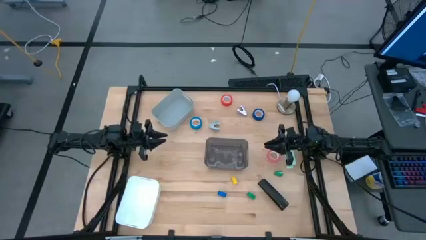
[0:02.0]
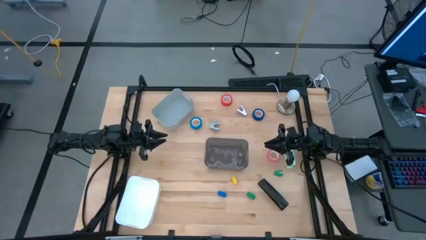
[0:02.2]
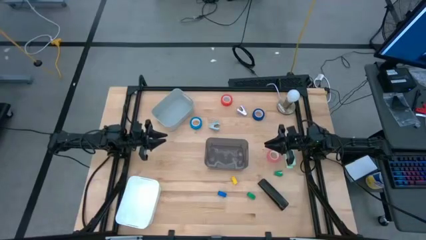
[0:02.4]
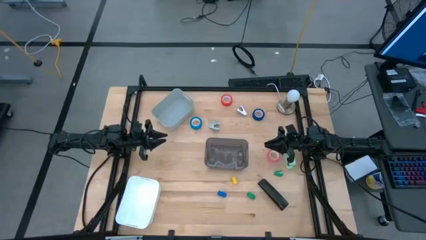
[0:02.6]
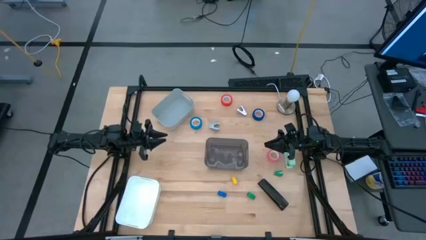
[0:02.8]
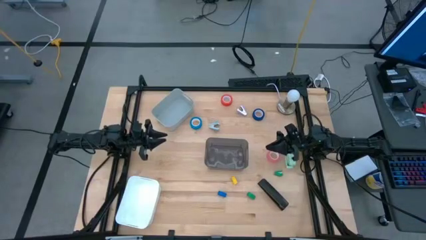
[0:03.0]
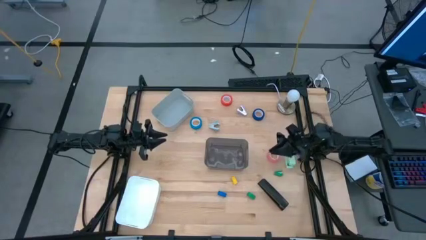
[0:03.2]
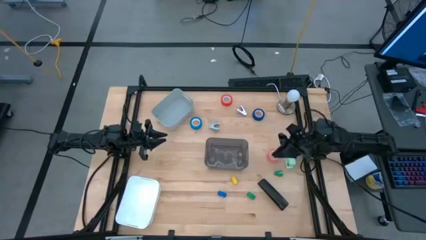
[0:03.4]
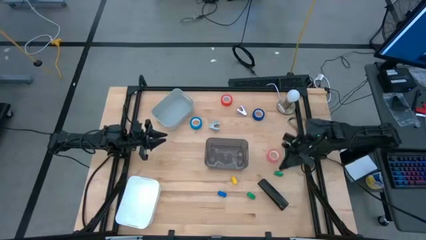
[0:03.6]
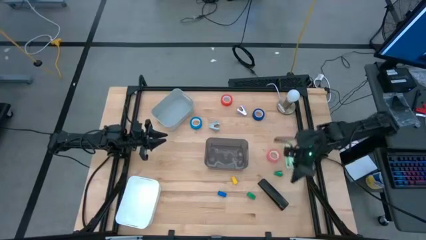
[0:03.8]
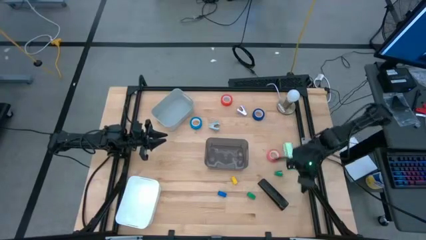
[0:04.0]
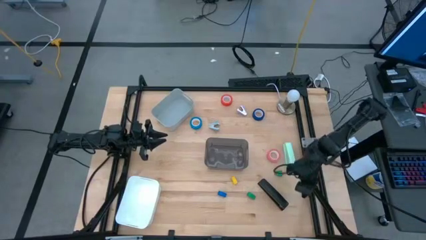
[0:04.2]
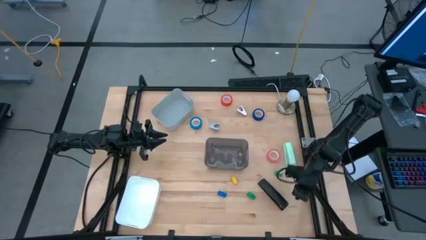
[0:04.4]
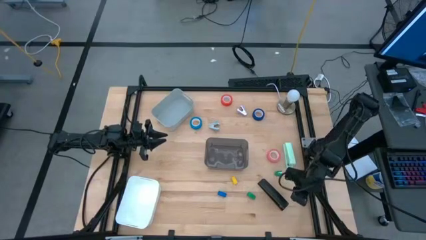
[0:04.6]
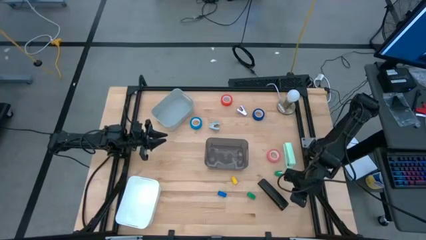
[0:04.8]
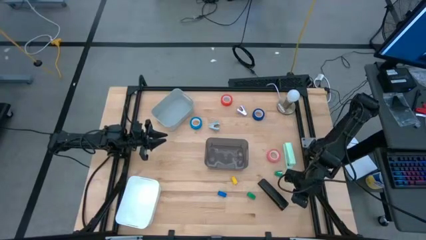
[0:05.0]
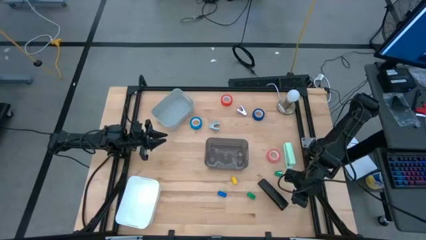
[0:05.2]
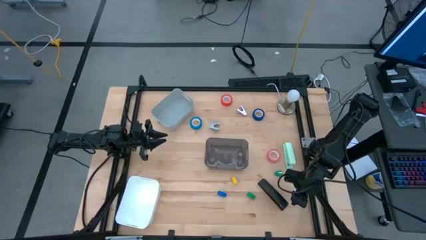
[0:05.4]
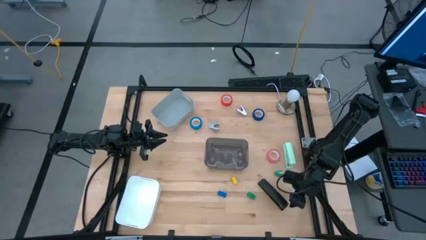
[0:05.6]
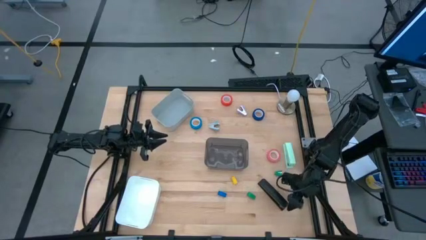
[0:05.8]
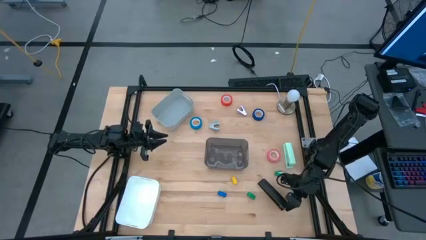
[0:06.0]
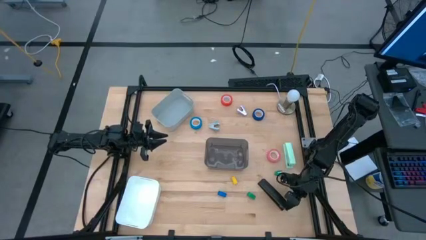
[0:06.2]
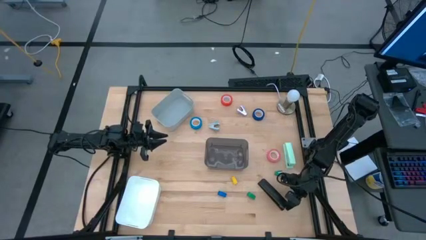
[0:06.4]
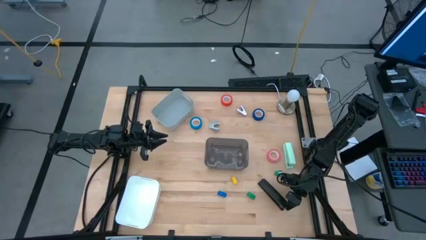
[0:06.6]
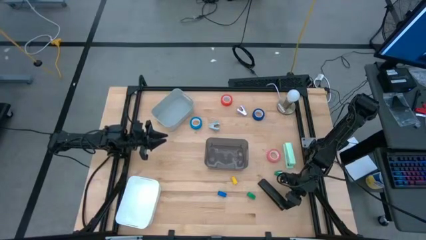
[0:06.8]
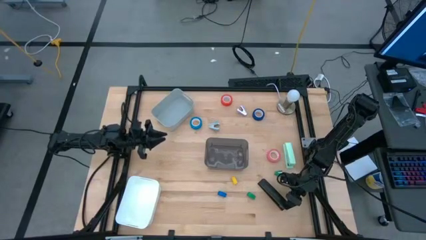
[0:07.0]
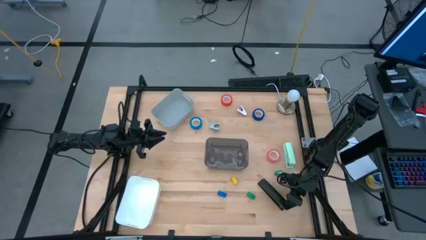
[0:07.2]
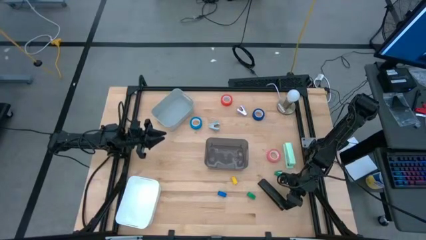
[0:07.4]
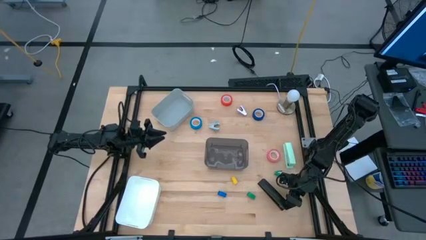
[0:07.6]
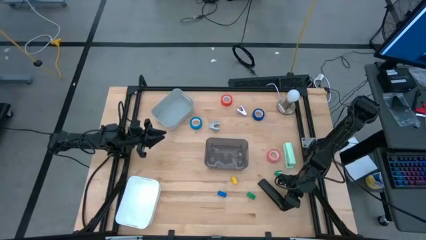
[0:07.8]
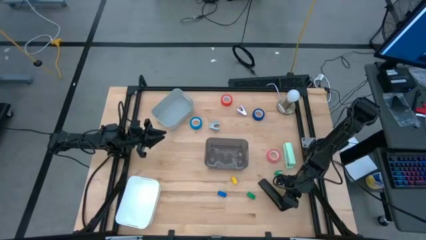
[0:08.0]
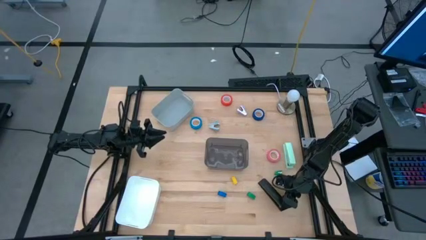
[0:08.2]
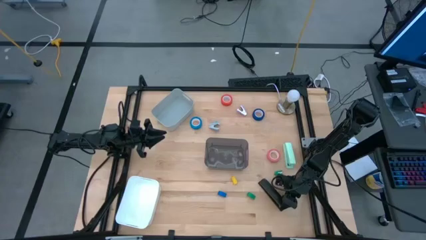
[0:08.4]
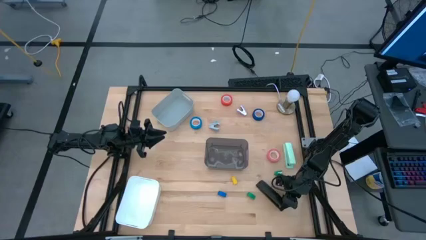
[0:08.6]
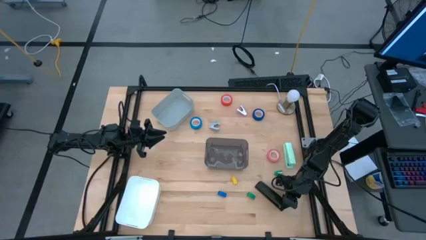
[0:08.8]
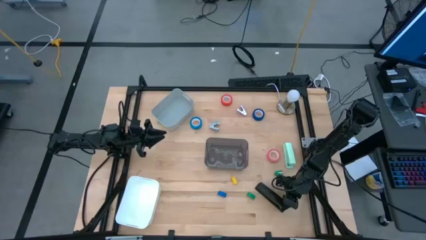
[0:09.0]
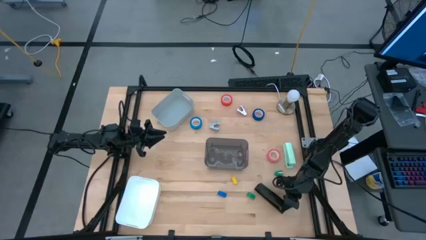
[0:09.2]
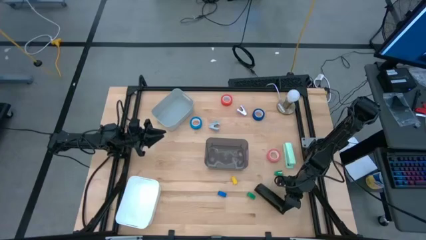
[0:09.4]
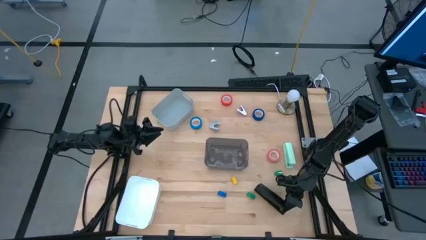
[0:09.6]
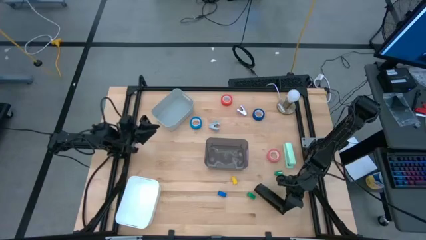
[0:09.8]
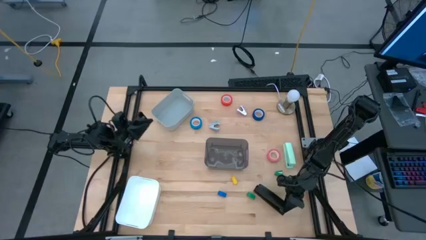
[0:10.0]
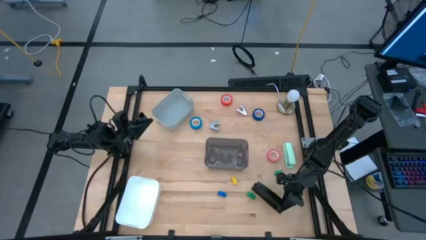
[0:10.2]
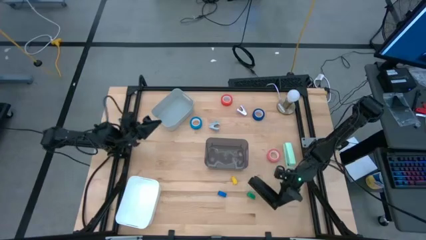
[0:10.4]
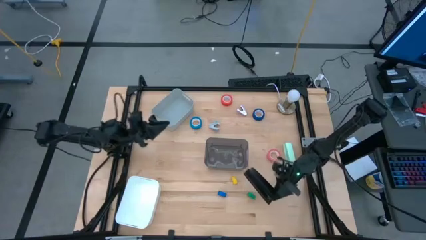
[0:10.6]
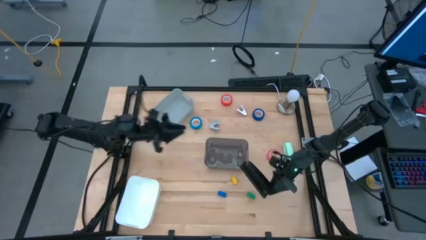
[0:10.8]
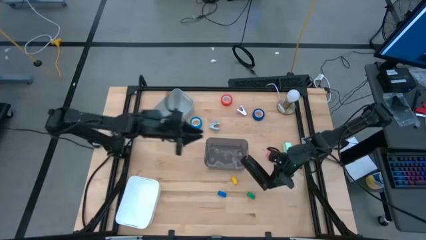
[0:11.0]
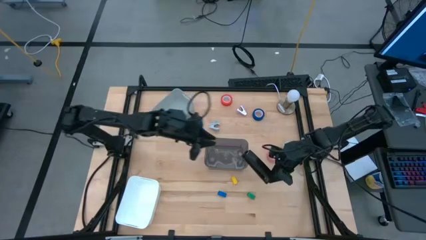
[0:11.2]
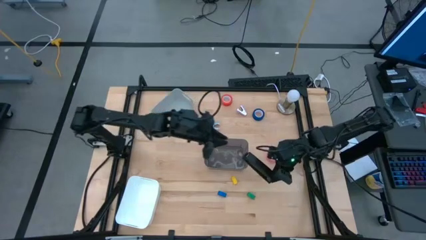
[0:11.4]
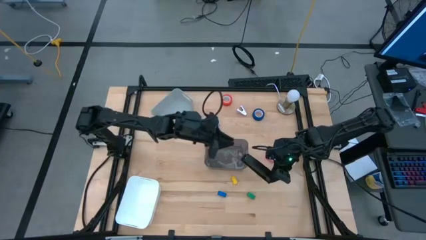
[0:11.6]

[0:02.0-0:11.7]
Task: Pick and place Stapler, Stapler remover, tape
Put the large black stapler into the gray bin

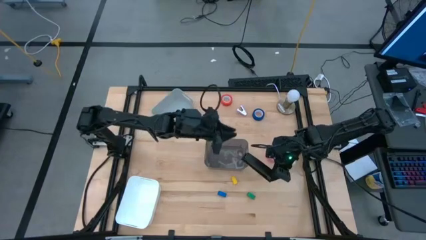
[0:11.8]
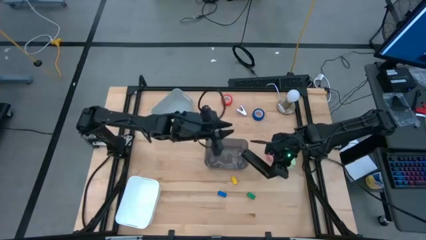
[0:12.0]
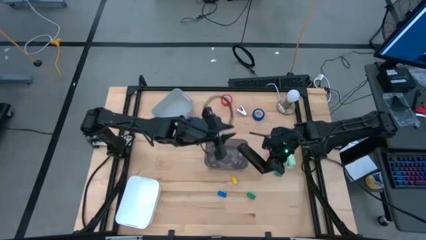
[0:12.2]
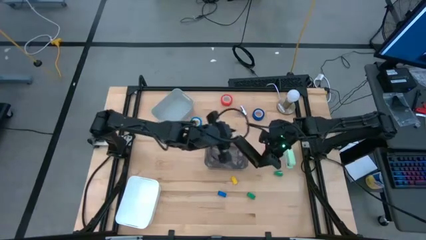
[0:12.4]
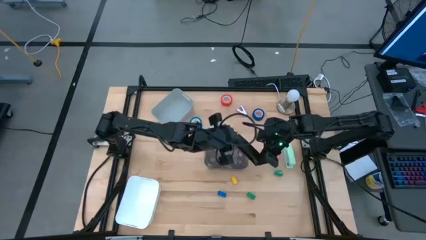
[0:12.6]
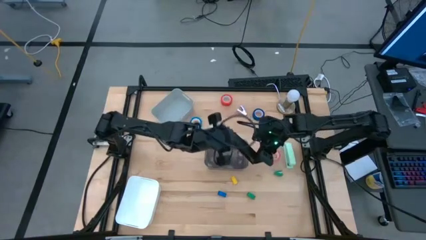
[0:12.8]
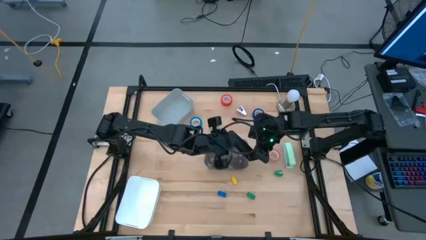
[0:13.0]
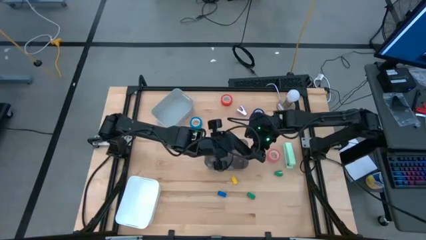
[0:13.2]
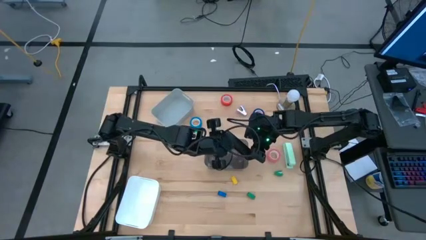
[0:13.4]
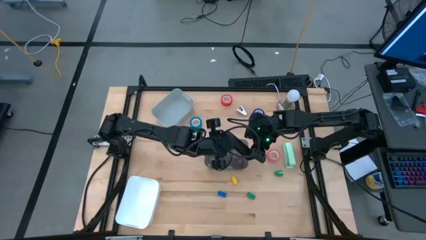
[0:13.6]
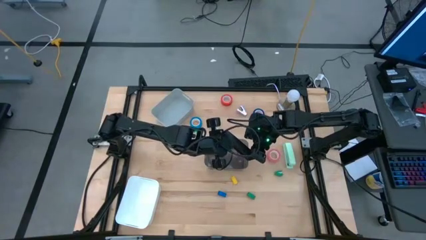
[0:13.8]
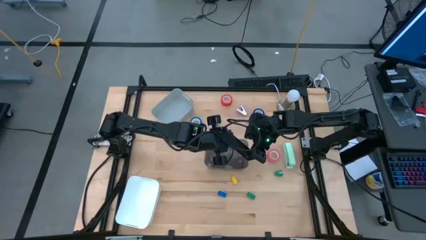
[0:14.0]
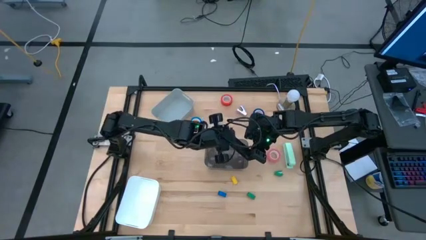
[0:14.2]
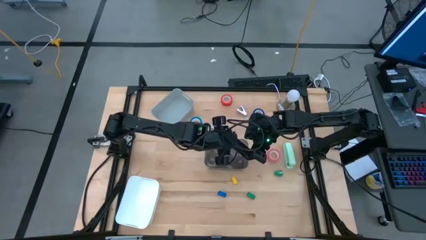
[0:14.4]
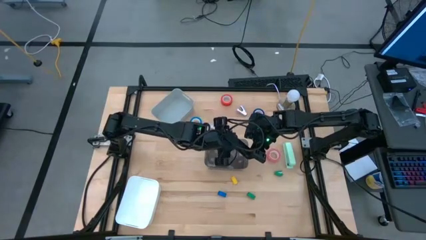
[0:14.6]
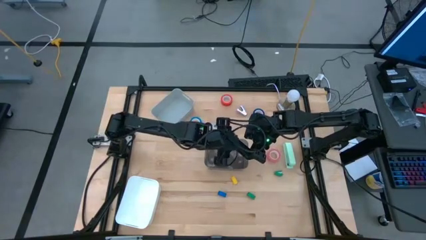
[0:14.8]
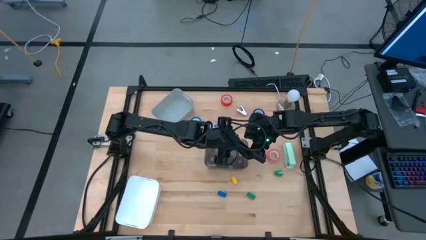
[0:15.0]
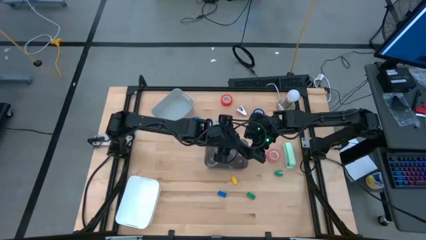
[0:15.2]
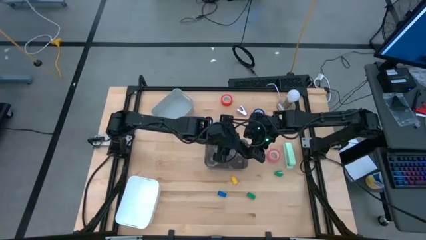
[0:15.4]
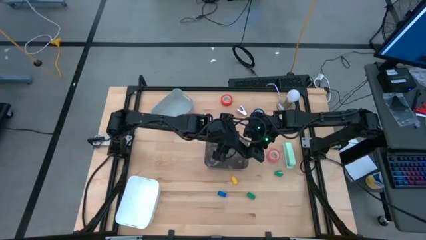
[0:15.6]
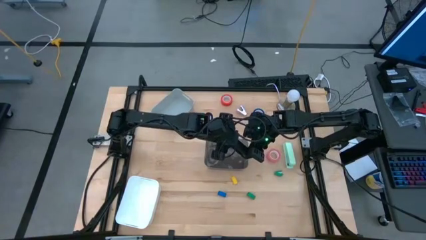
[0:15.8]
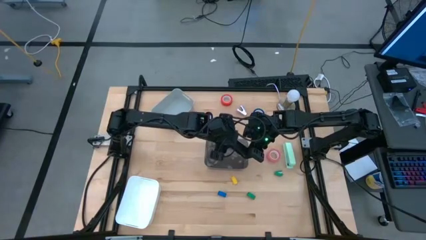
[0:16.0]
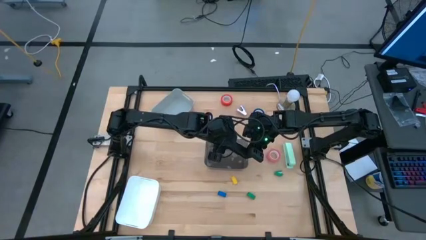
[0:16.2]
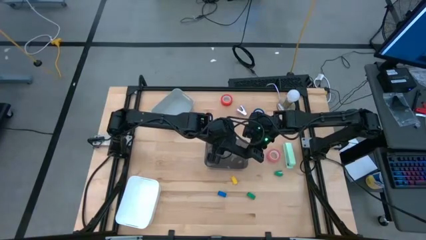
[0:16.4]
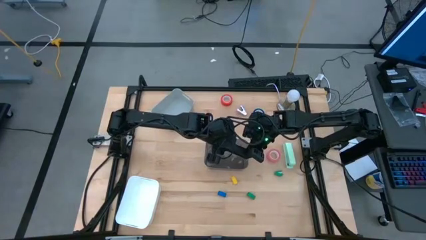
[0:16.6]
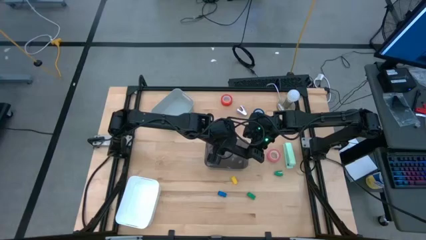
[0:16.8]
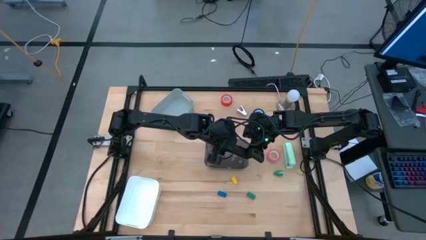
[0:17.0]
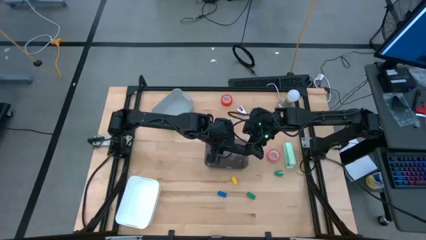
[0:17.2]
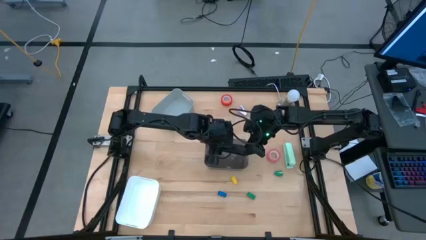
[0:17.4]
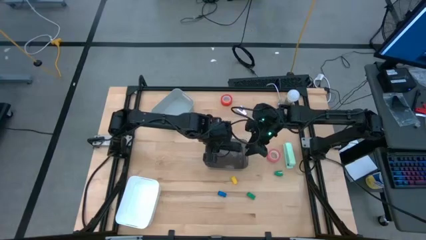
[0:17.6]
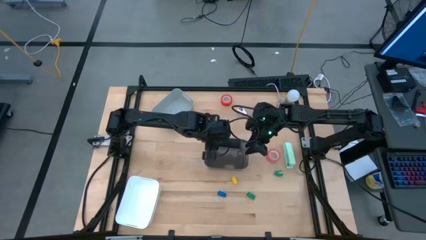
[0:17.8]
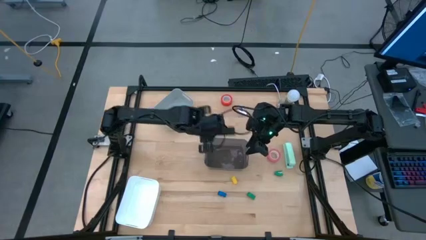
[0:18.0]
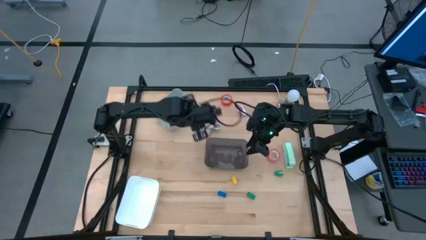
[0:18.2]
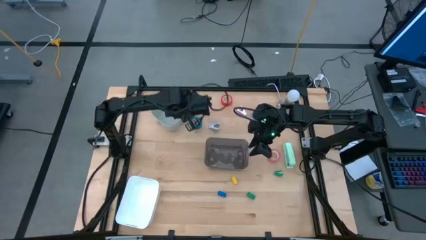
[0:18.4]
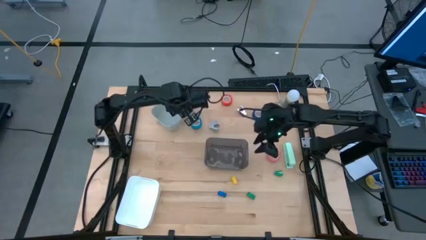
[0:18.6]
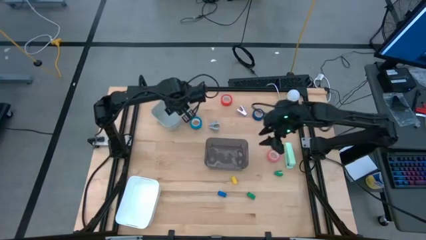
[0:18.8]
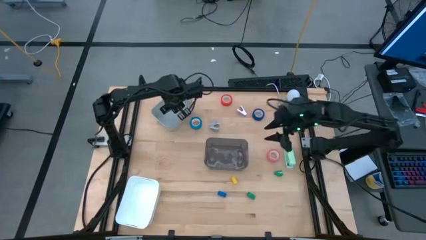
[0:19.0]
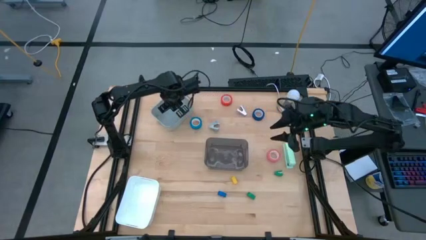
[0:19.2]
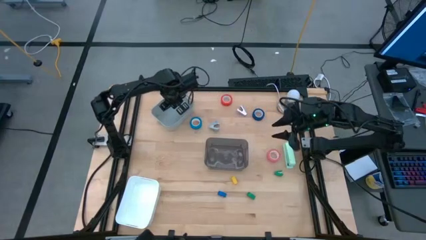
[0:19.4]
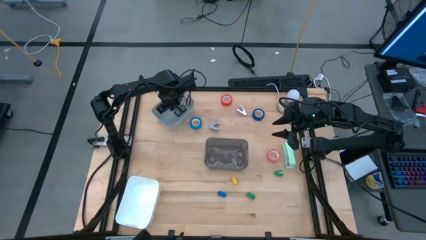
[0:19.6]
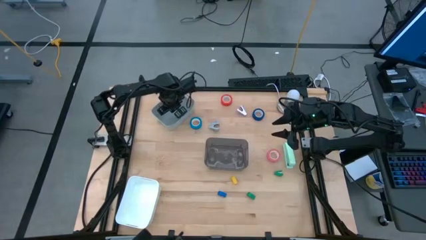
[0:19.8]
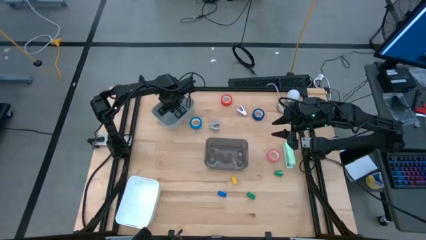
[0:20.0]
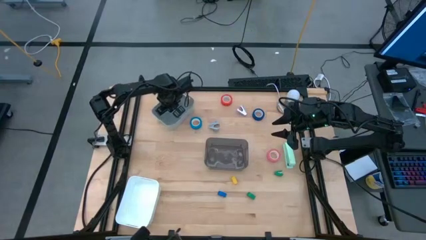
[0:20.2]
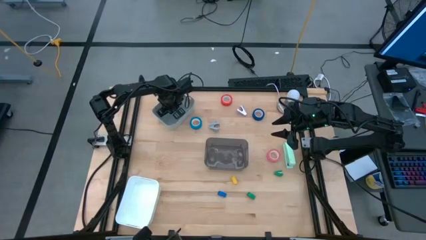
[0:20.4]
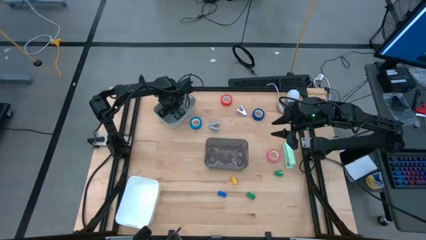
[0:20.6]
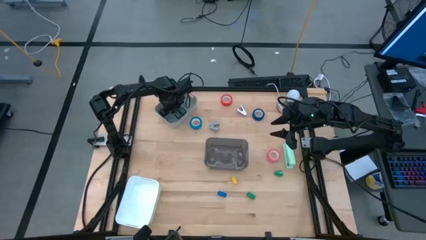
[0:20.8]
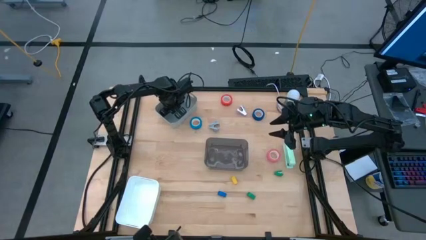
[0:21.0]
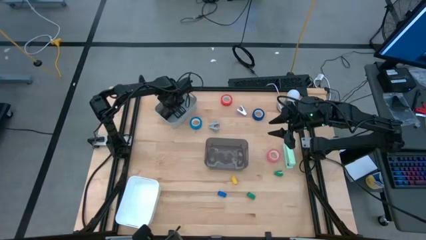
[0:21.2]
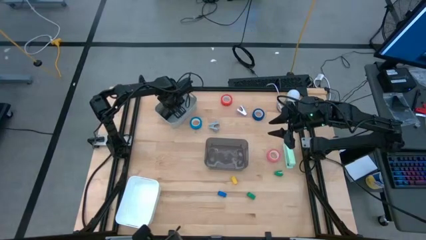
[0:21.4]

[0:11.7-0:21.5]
Put the large black stapler into the gray bin
